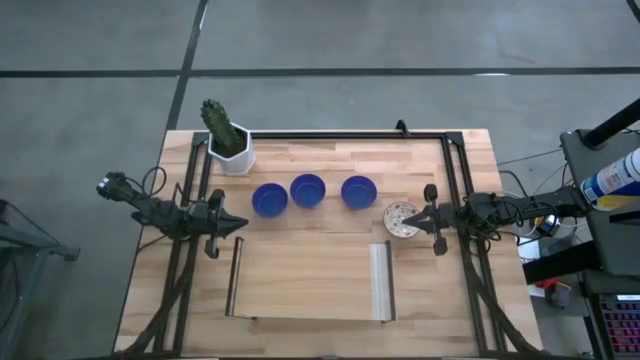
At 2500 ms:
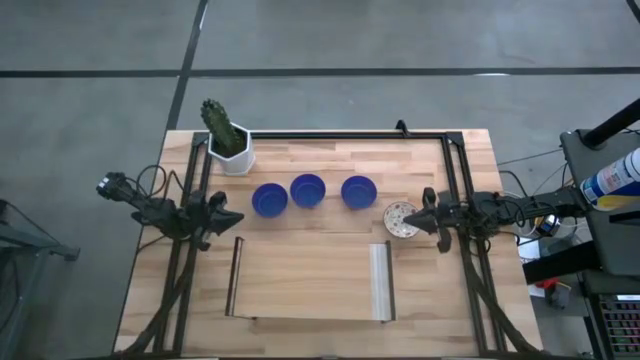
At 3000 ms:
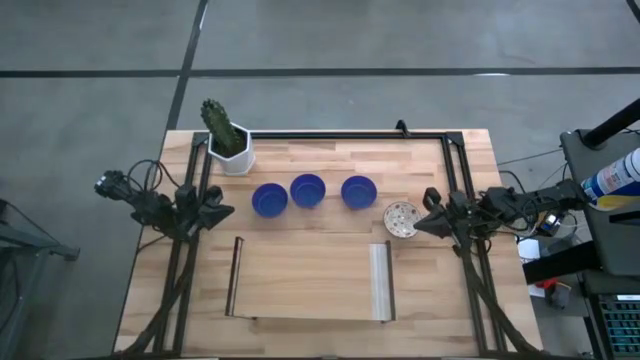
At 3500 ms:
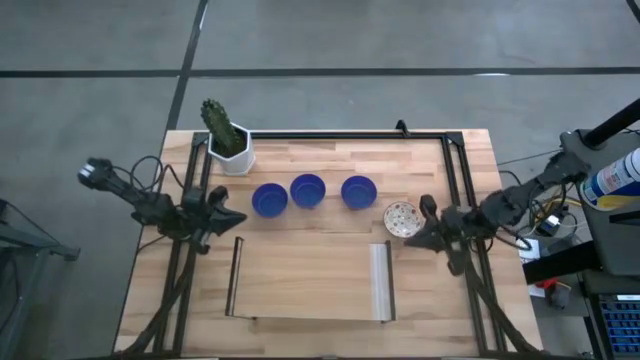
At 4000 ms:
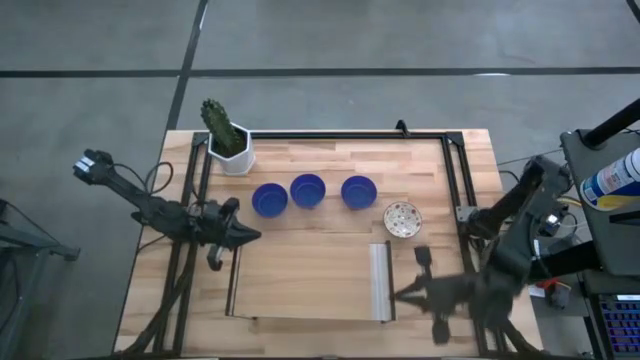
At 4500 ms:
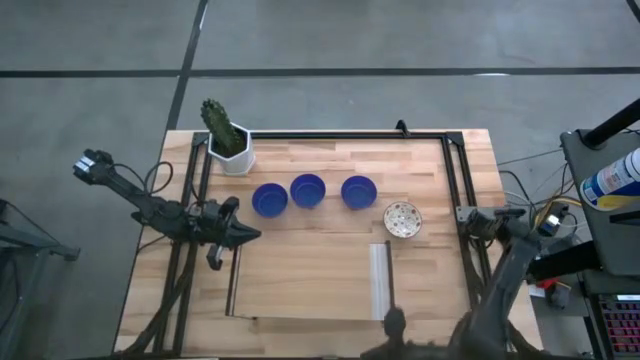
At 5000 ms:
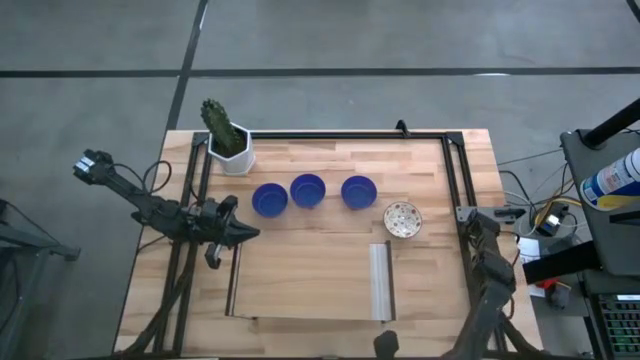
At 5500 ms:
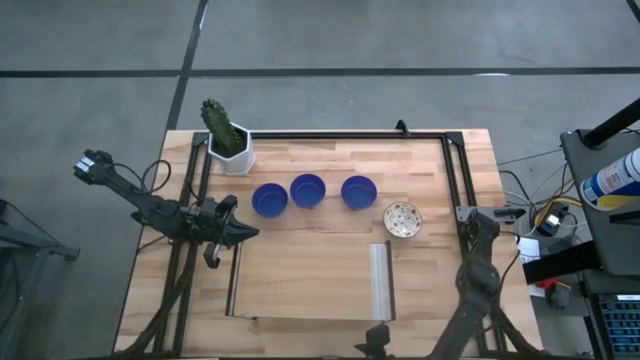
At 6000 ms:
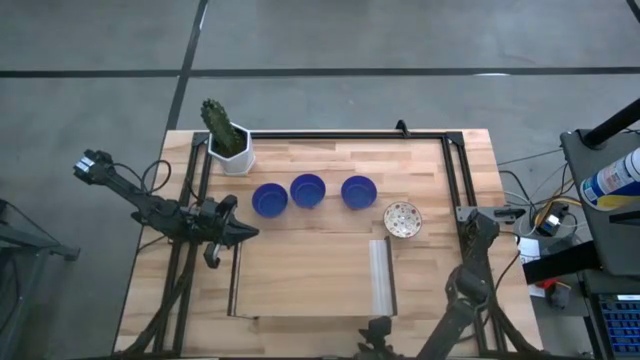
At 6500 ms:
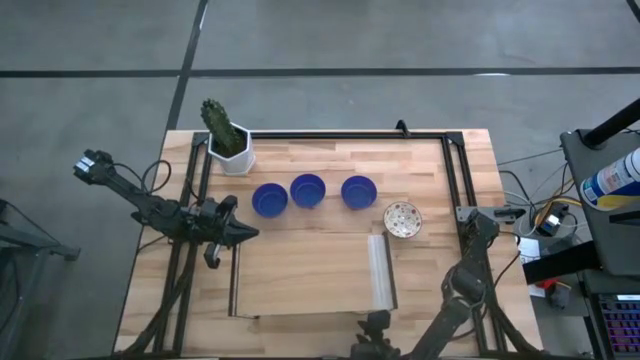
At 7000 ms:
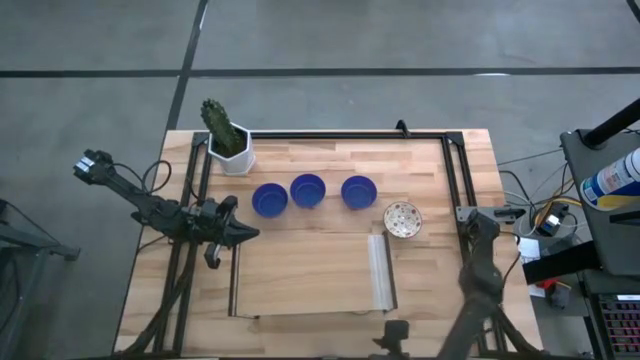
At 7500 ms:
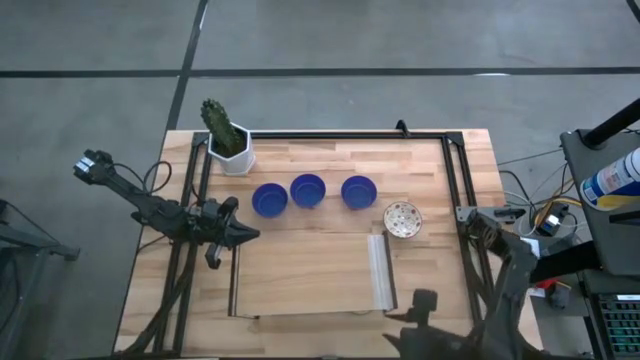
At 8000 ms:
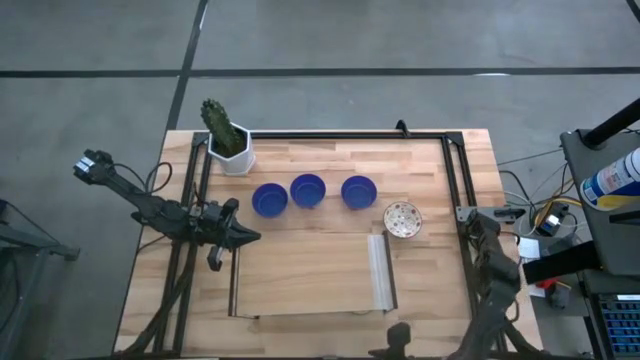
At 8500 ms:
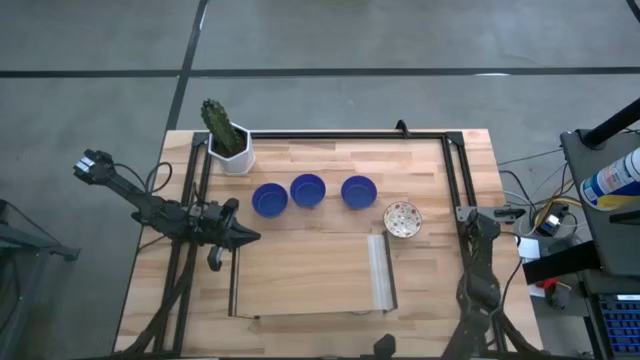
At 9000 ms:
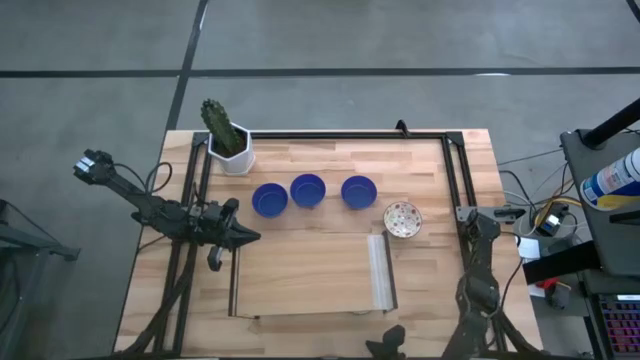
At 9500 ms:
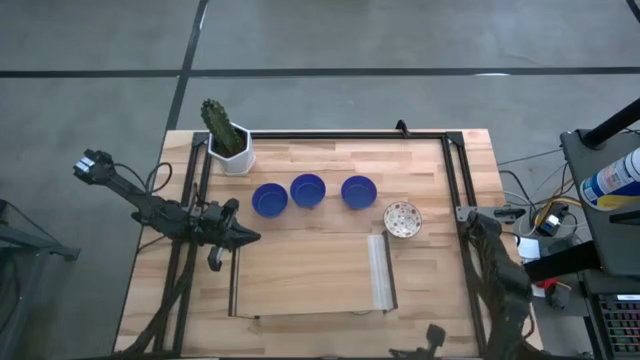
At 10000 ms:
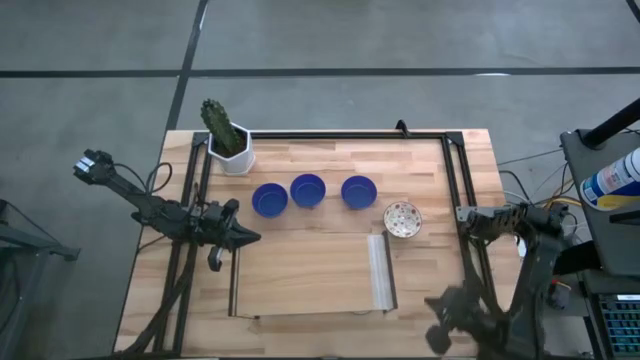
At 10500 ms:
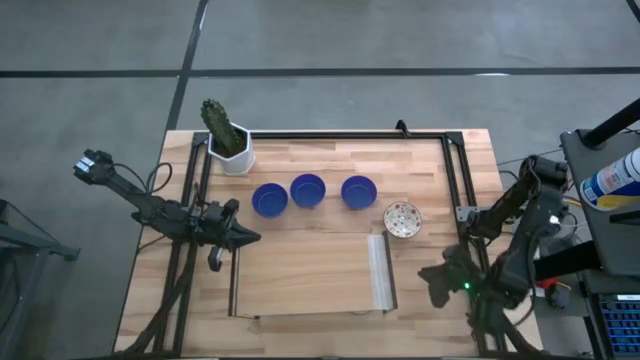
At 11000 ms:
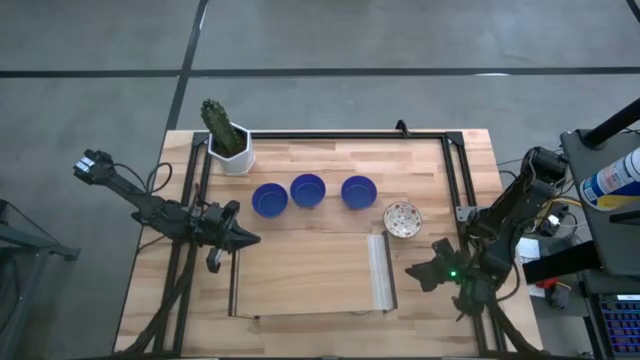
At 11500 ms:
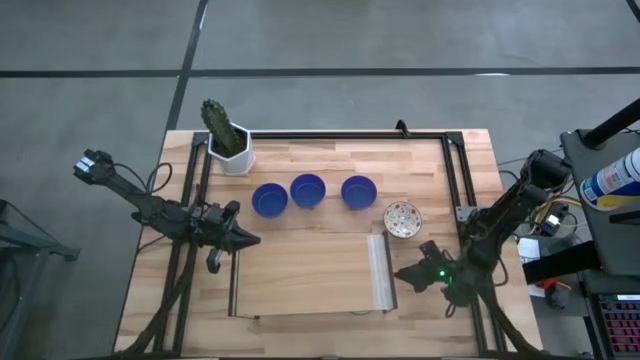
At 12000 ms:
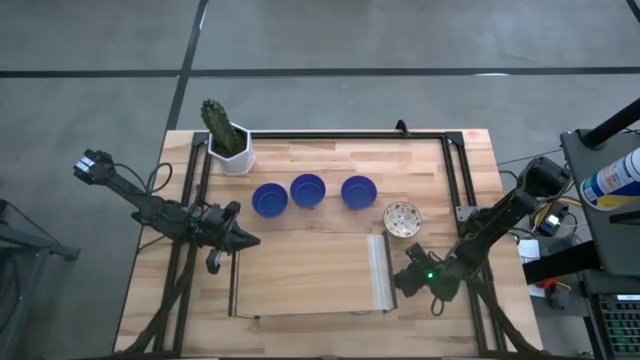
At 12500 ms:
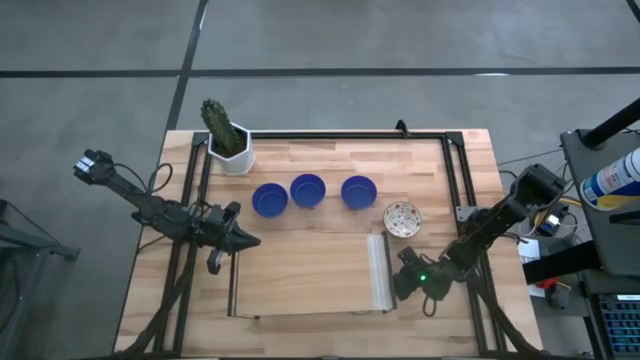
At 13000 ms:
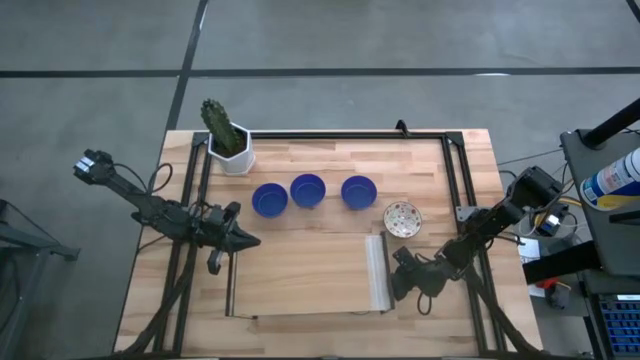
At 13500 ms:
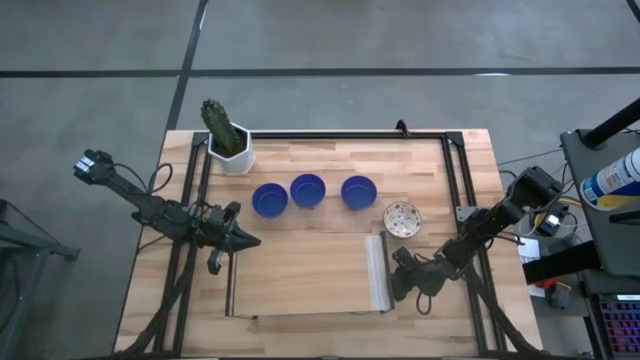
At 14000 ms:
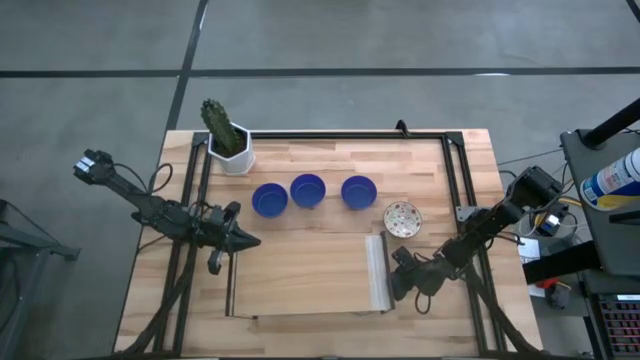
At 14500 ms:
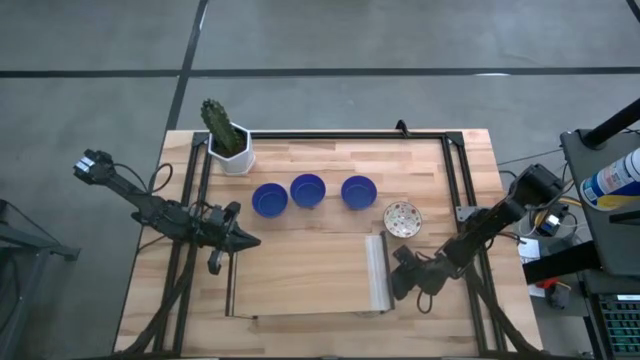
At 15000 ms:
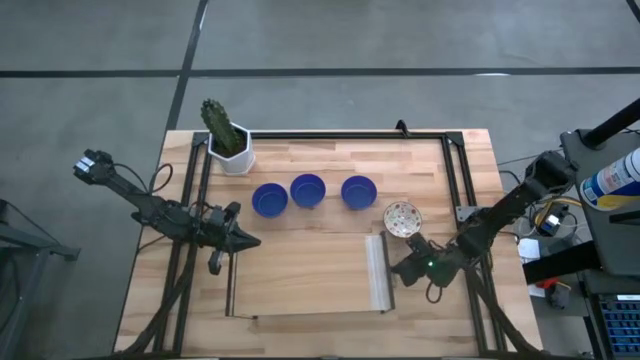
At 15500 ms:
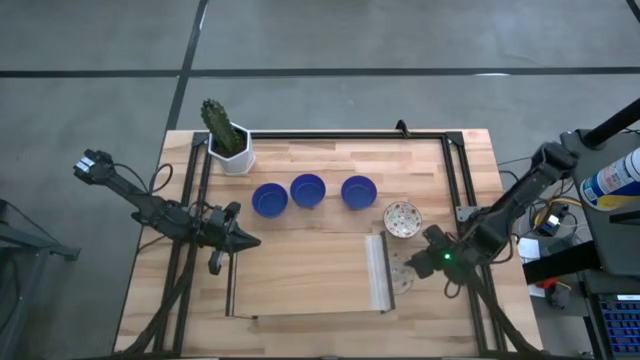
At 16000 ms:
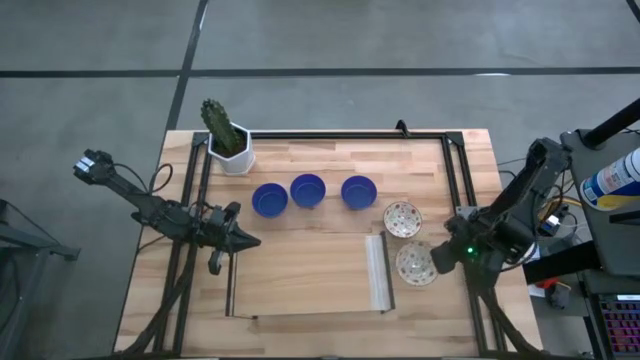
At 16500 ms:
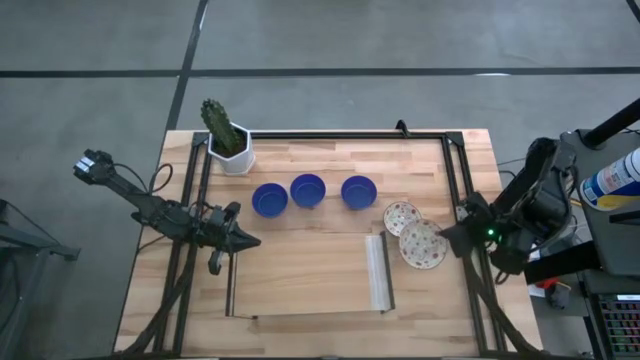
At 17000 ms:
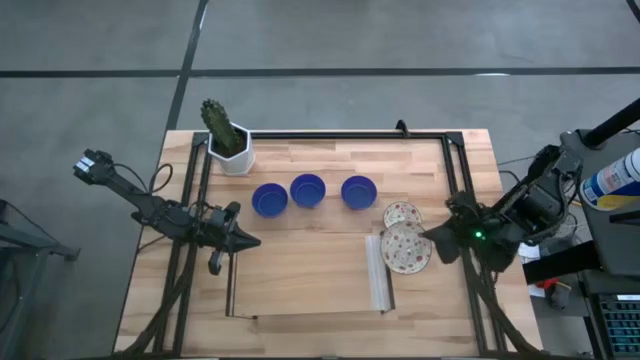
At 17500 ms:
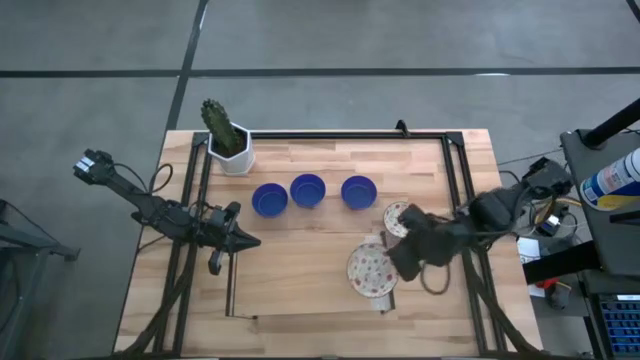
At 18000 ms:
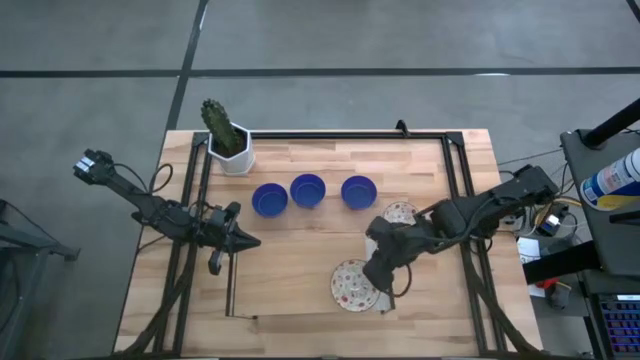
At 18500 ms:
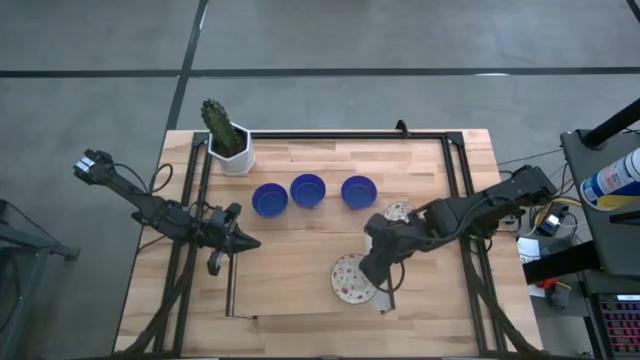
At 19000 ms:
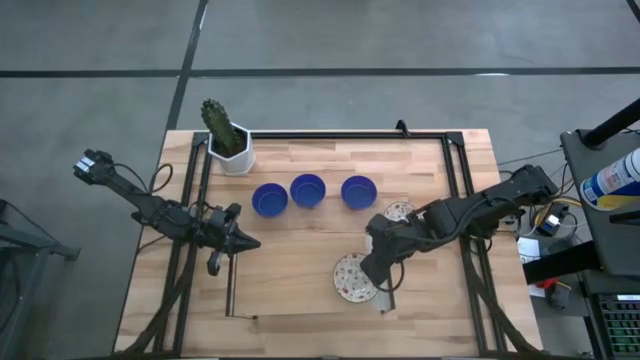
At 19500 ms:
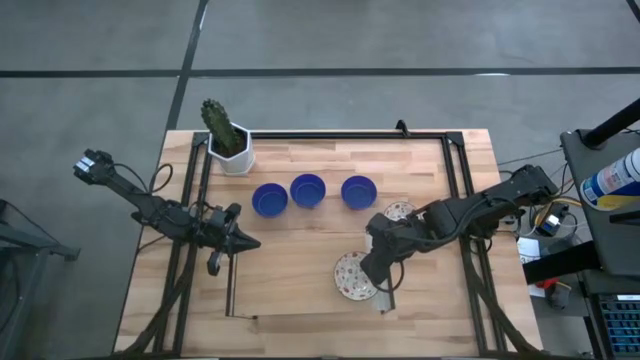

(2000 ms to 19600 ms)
Task: Pick & Place Mini bowls
Put the bottom right green bowl on the shelf

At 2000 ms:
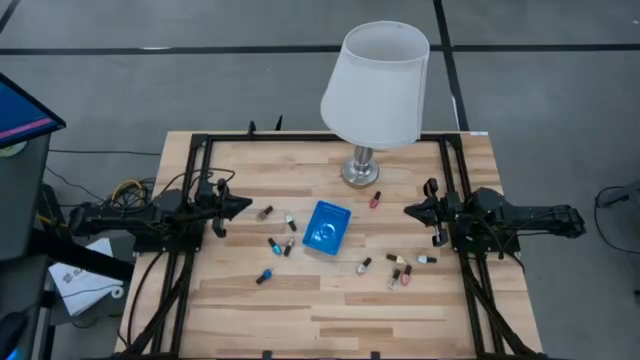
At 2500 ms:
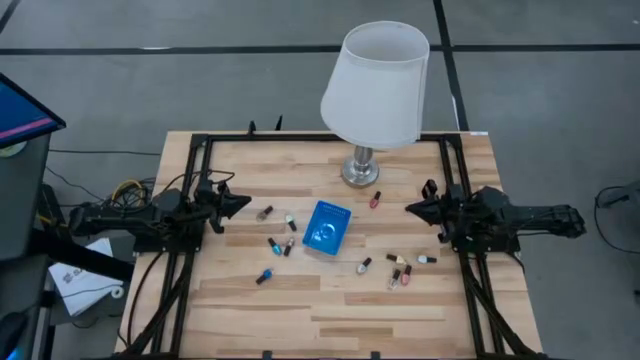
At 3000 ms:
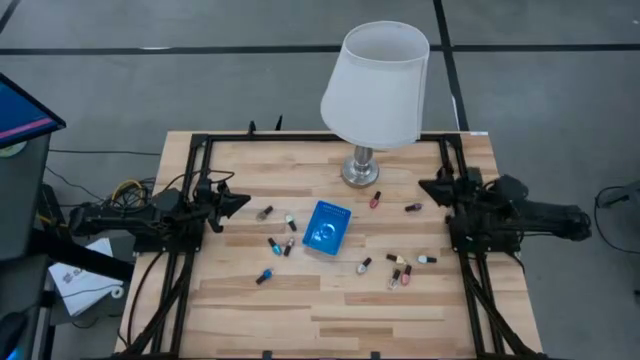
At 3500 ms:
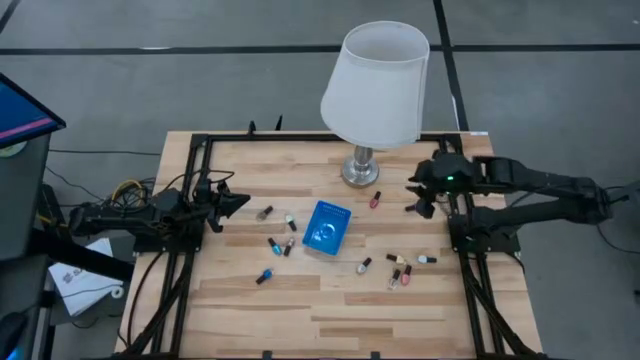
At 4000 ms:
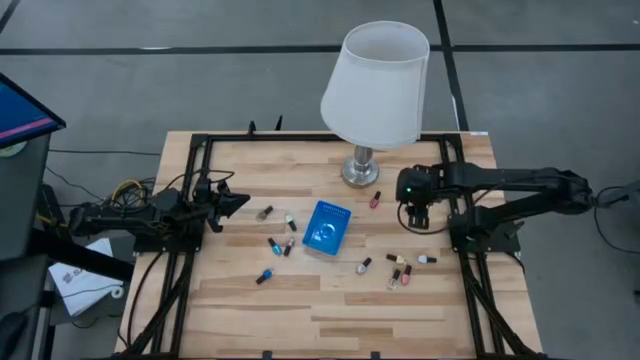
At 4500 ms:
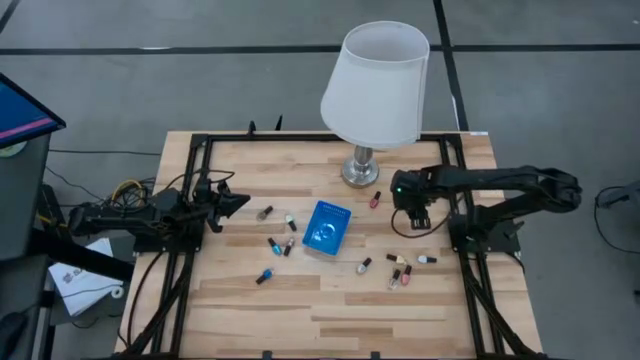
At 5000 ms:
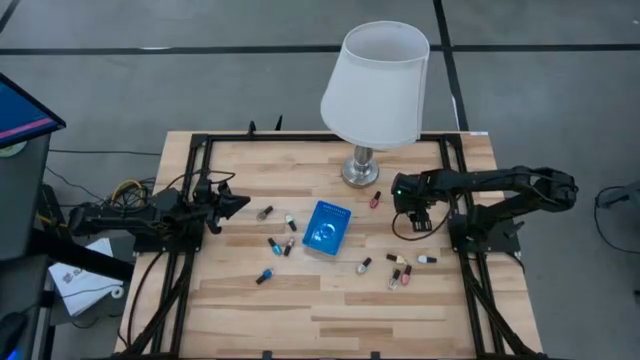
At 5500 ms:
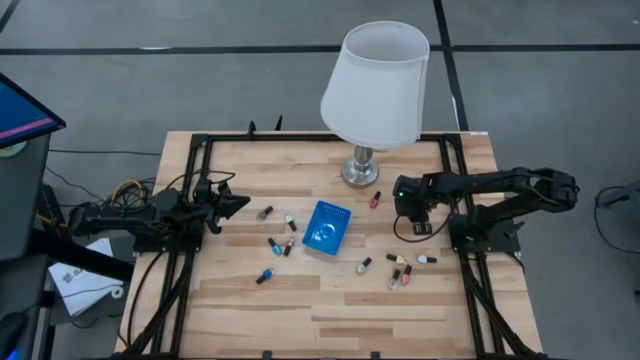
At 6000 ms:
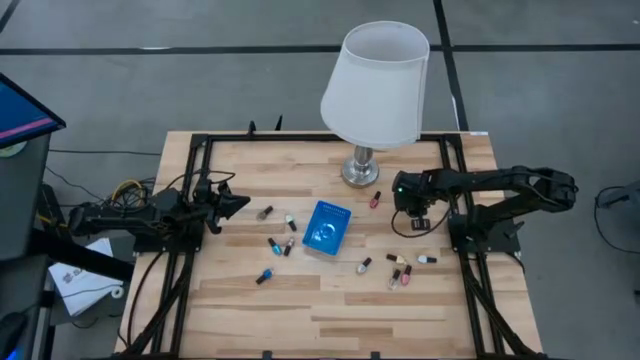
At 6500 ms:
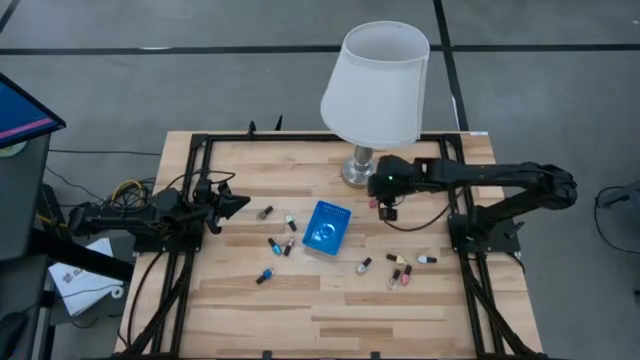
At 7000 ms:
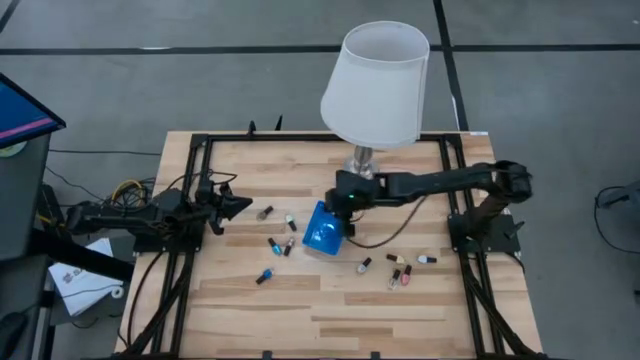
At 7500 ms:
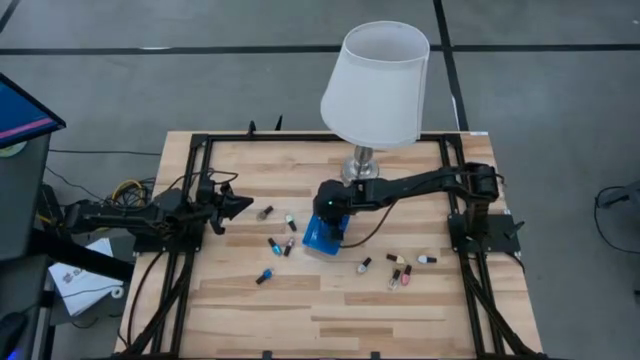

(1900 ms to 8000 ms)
Task: Pick & Place Nail Polish
Put the purple nail polish into the blue basket
